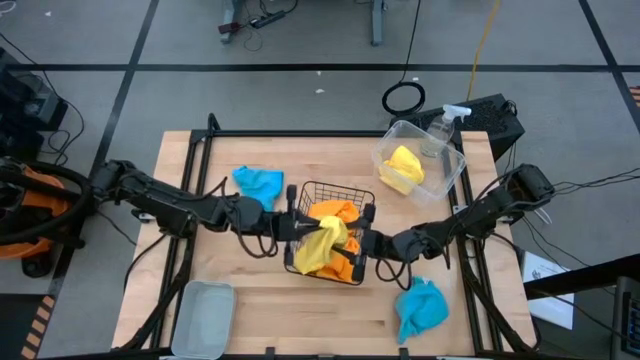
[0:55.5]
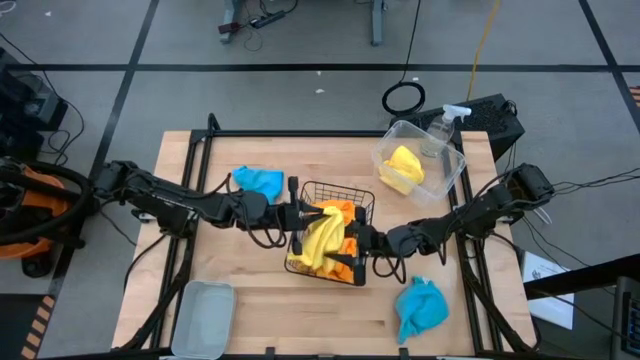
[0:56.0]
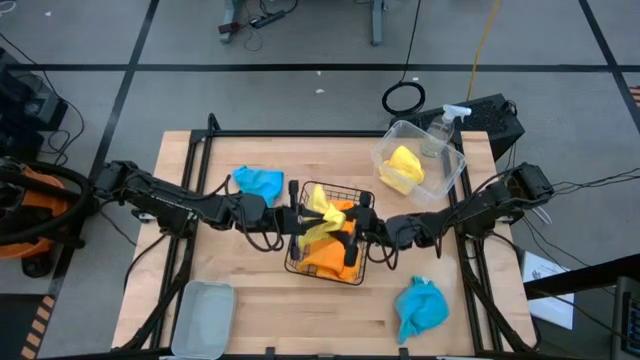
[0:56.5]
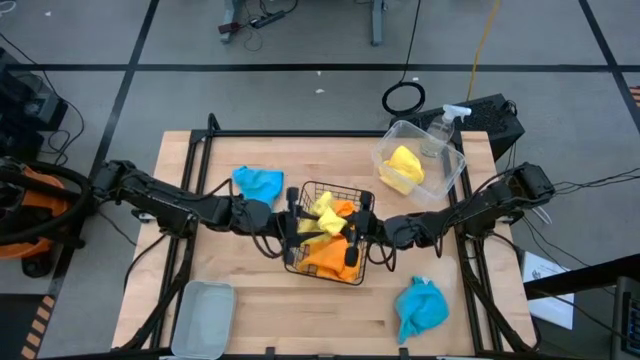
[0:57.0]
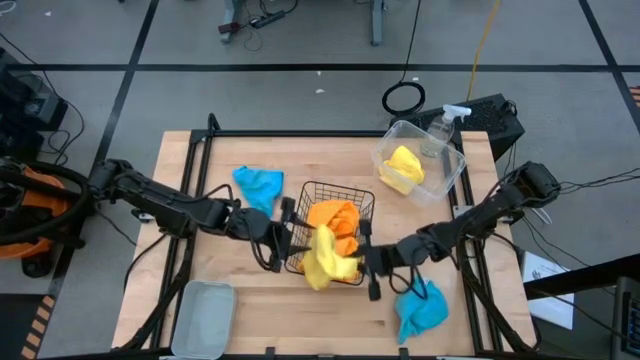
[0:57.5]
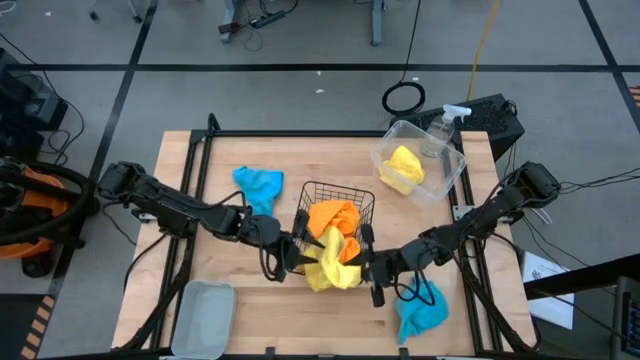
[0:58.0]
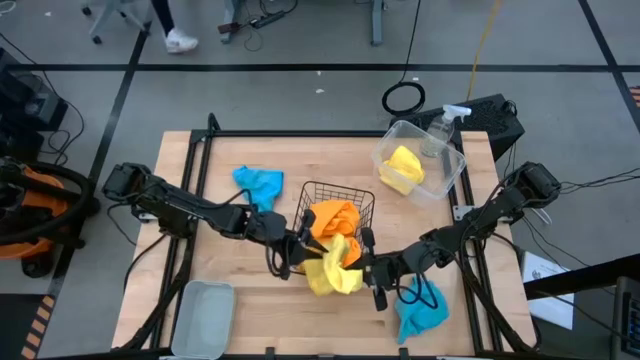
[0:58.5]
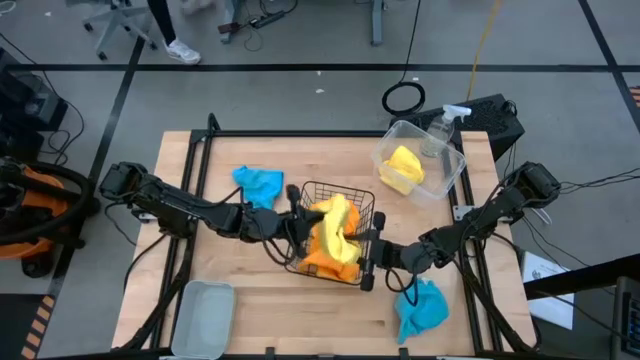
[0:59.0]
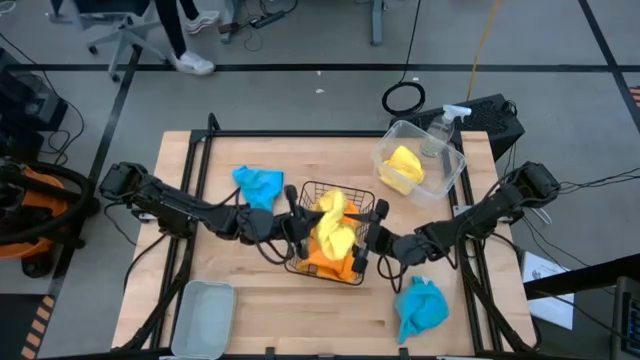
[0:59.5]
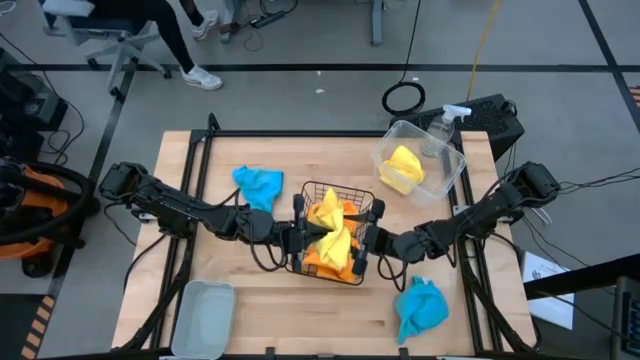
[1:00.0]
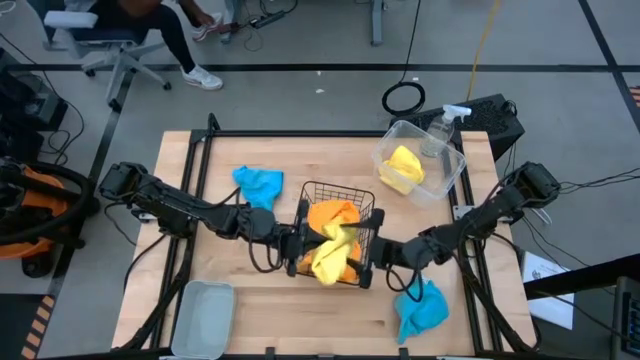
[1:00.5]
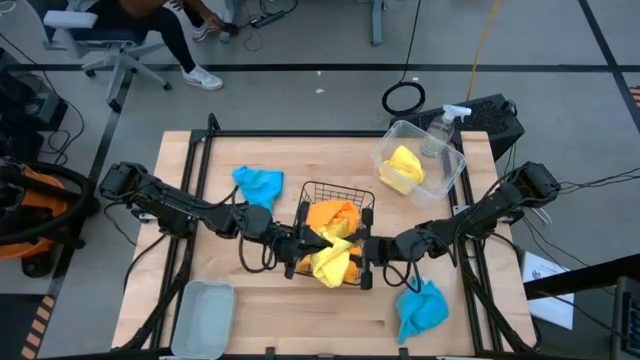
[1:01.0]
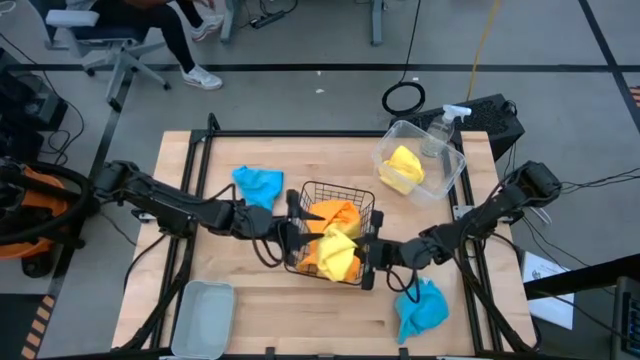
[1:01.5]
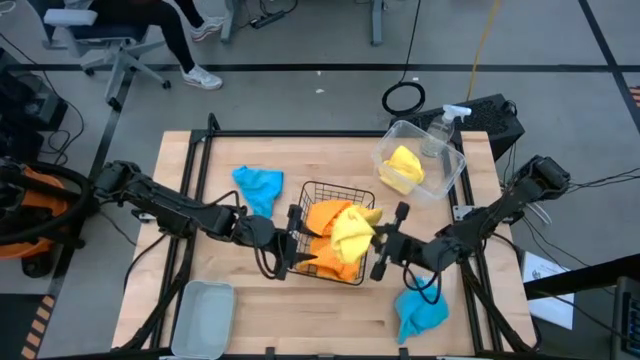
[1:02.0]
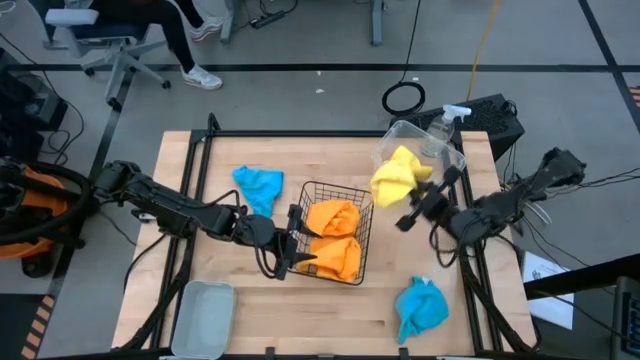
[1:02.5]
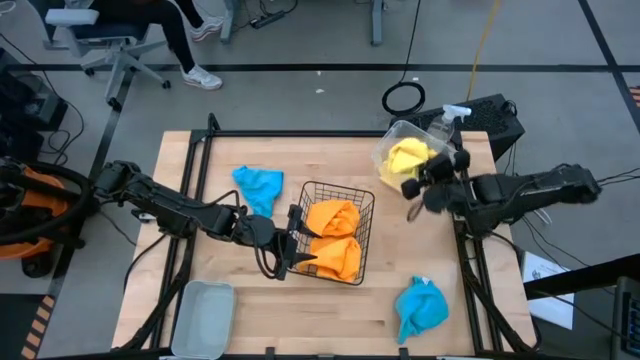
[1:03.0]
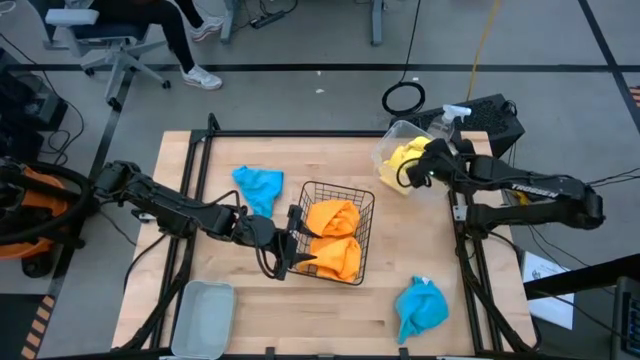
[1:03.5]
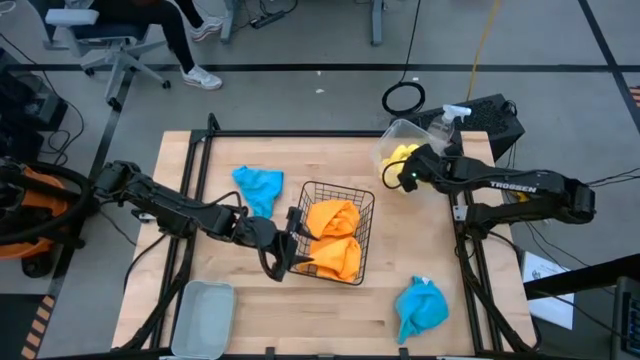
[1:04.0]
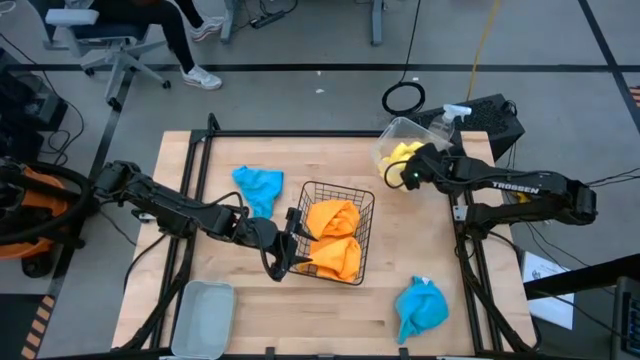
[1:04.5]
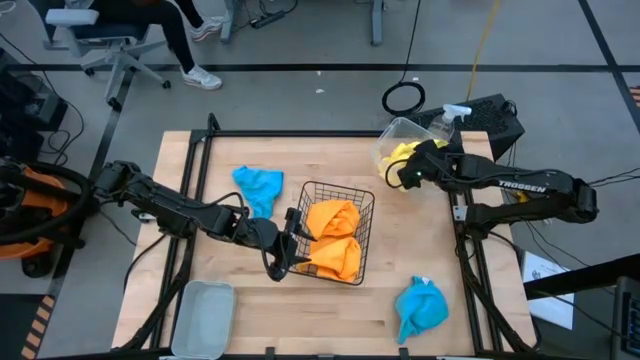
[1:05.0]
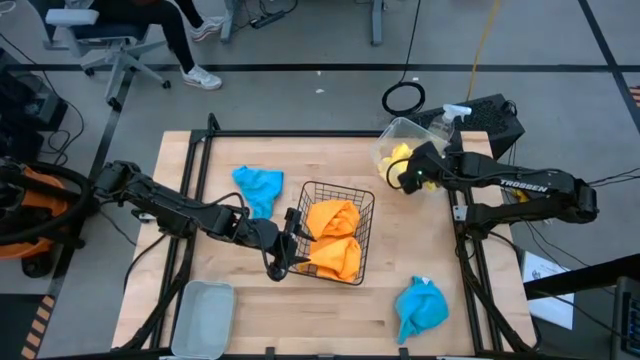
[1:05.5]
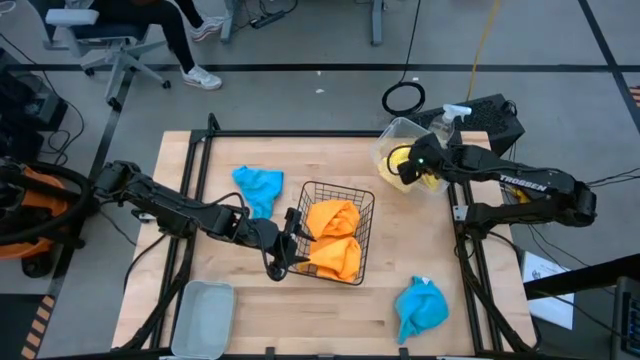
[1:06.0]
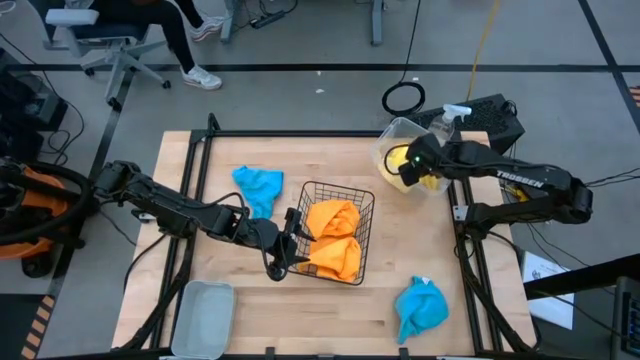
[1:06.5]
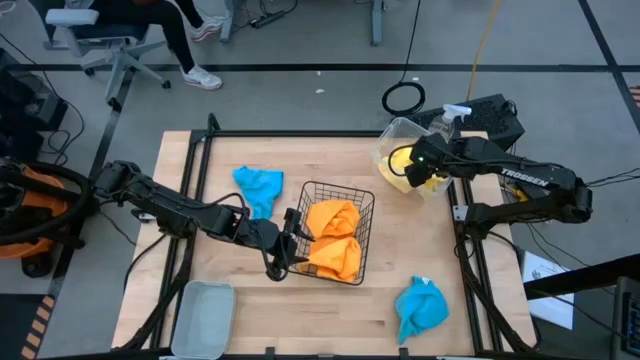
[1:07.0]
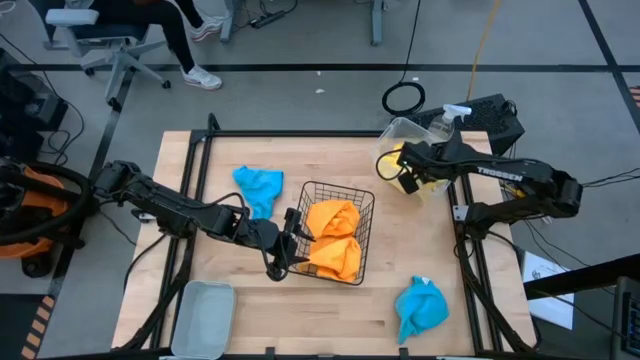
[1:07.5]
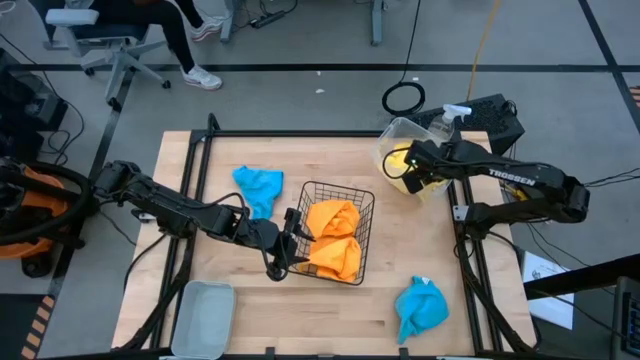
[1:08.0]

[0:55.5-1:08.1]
Task: Sort microfiber towel by color & place in baskets
Put the yellow microfiber towel into the transparent bin

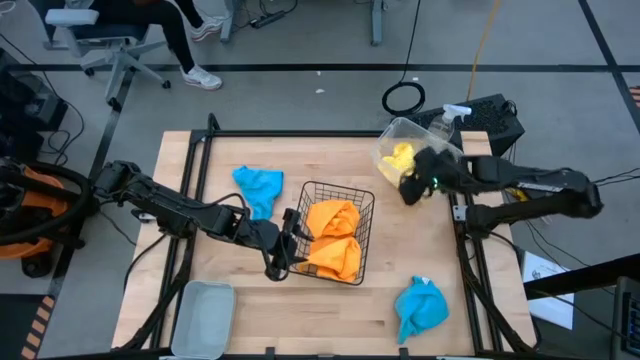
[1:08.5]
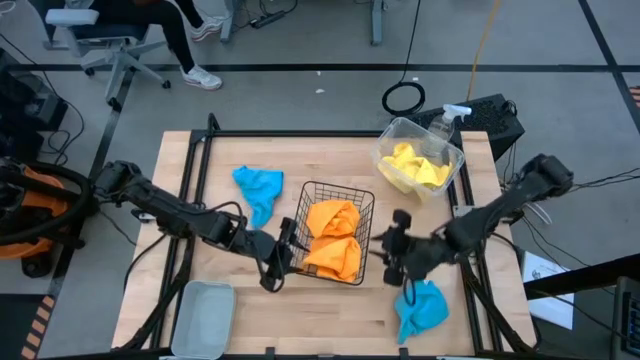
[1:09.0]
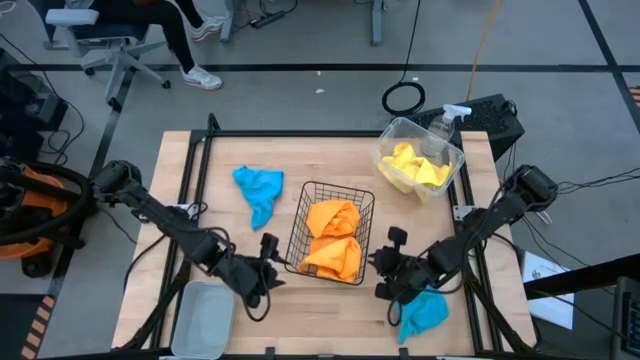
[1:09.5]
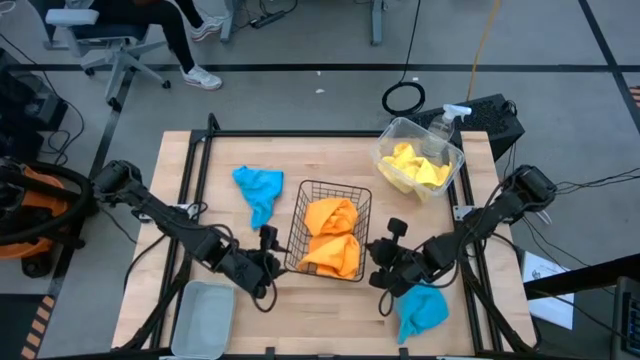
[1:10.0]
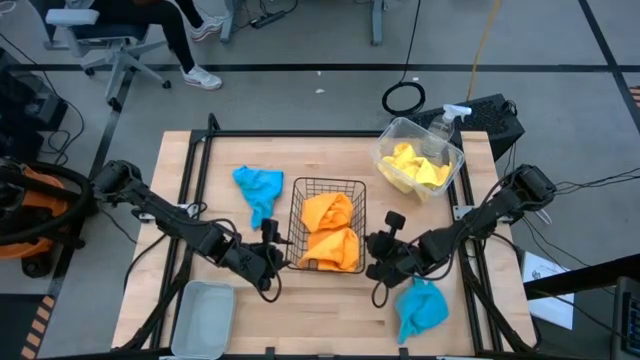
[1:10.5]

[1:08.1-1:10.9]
Adjust the wire basket

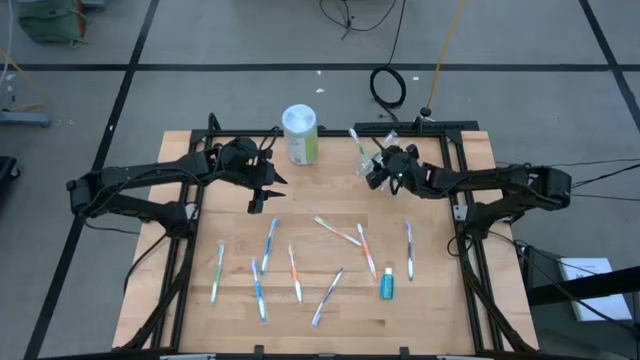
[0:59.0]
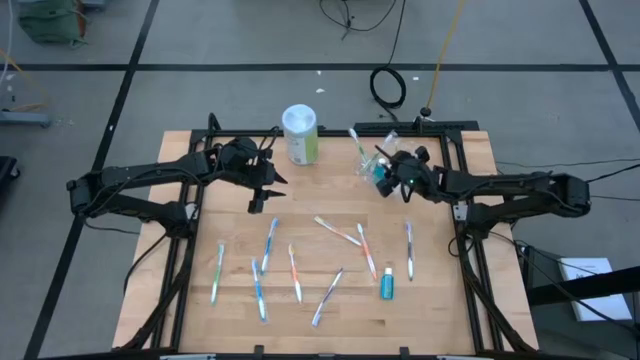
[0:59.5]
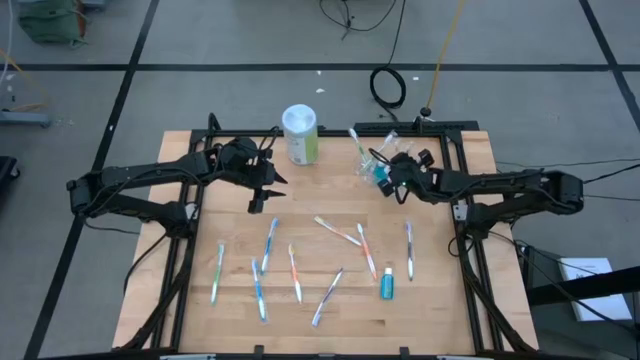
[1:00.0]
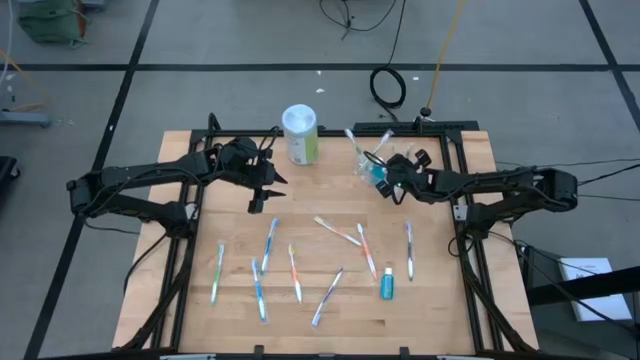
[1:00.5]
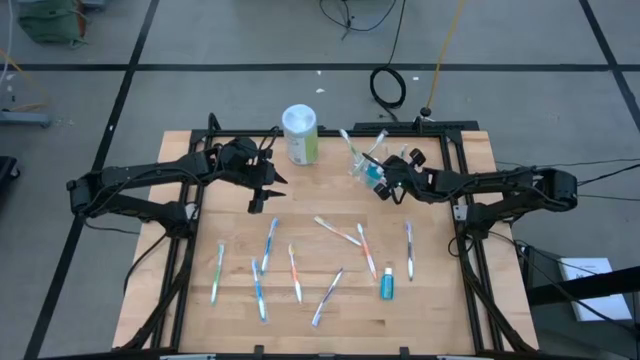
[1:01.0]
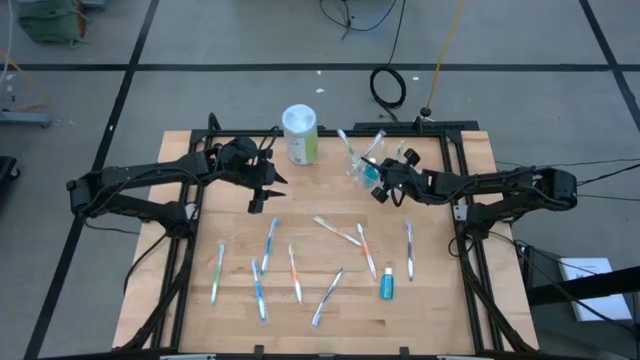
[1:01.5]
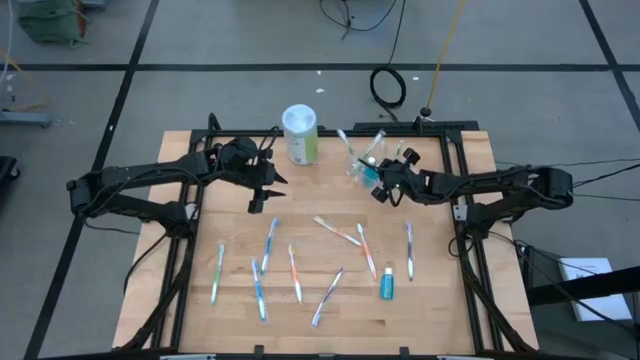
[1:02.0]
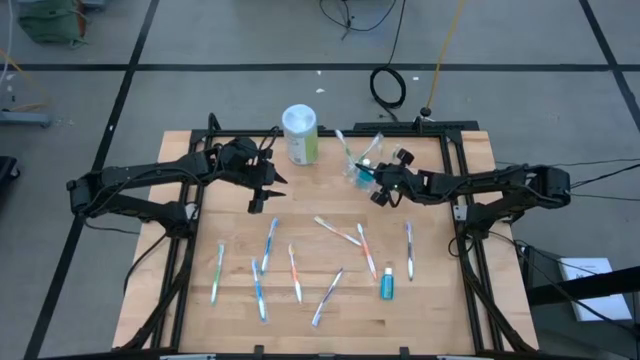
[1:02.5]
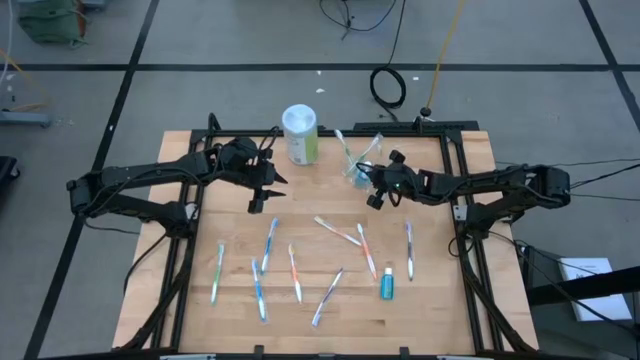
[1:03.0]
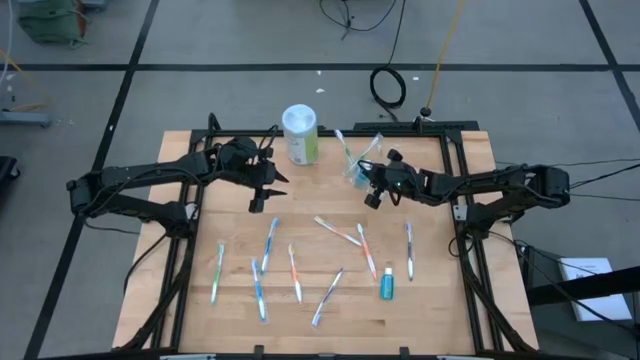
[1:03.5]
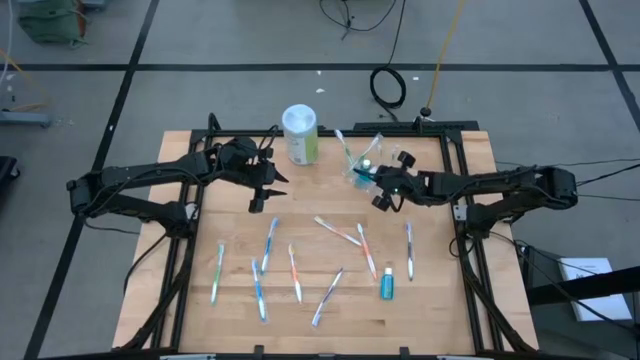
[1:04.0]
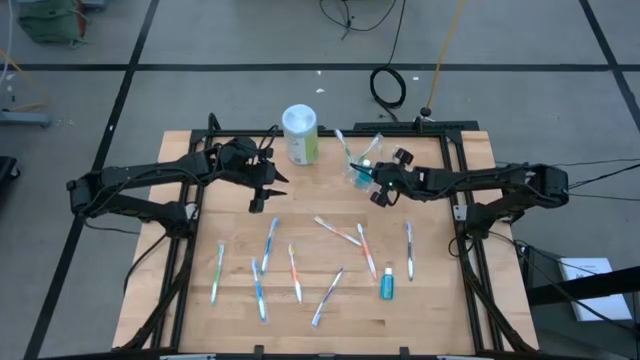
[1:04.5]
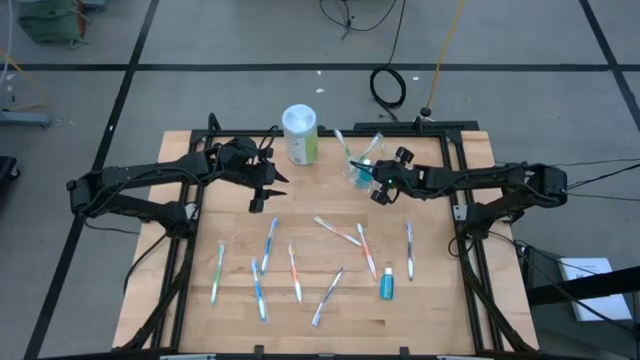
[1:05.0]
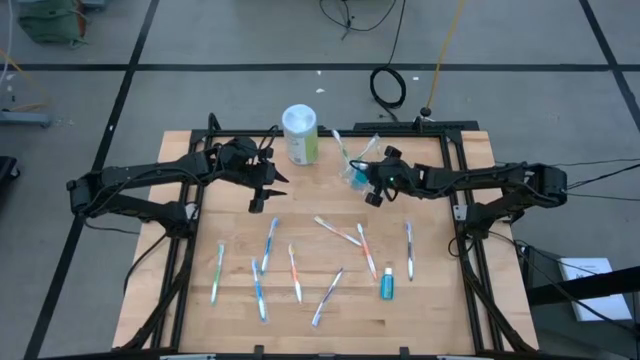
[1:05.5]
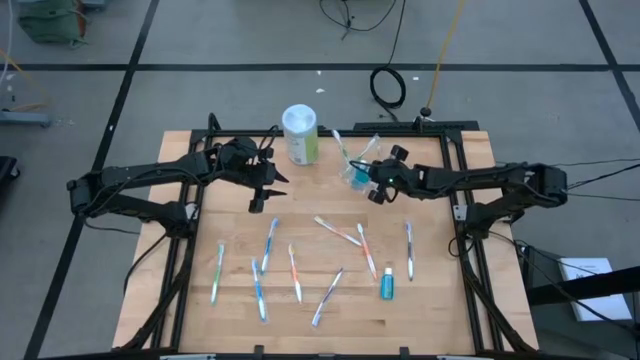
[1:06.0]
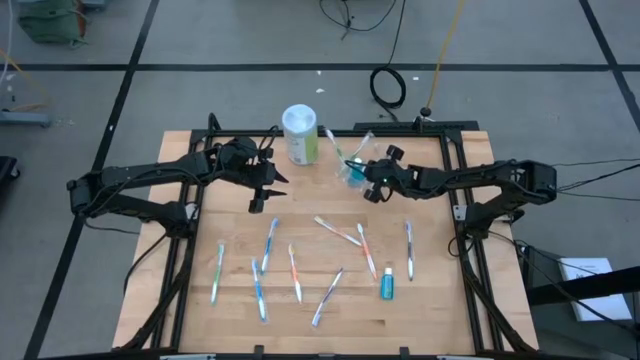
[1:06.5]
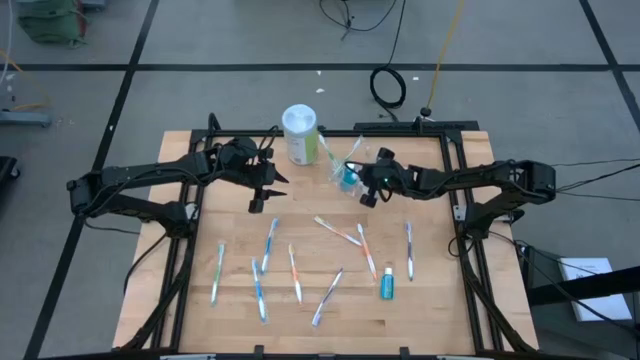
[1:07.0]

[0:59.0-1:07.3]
Task: Pick & Place toothbrushing station
Adjust the toothbrush and mouthwash in the transparent organizer
